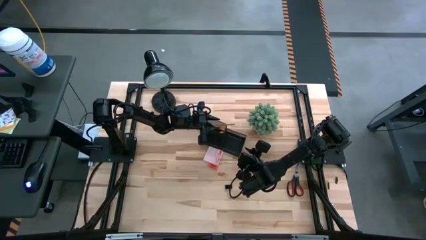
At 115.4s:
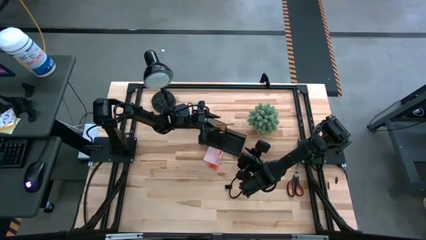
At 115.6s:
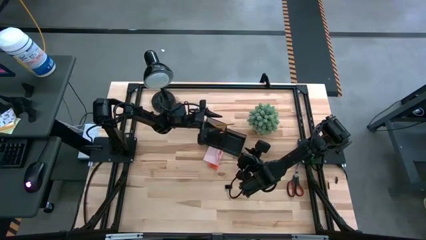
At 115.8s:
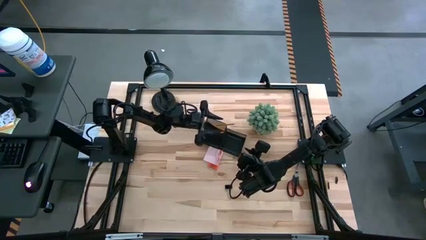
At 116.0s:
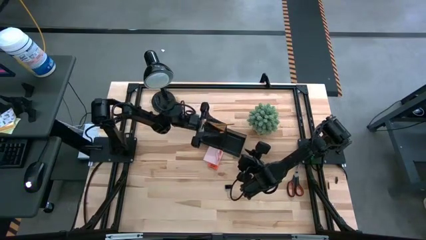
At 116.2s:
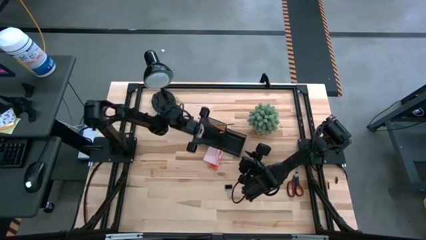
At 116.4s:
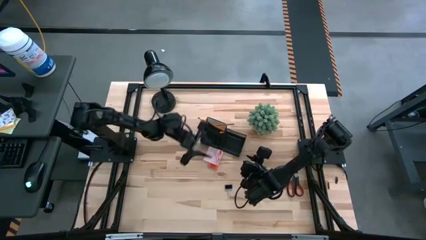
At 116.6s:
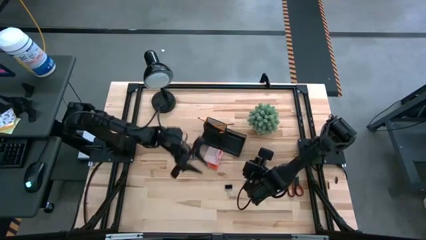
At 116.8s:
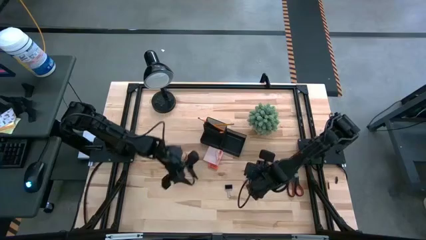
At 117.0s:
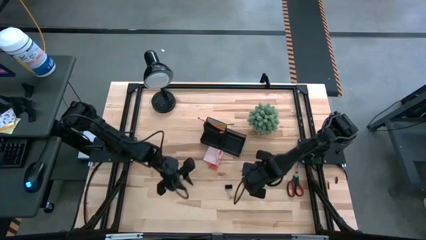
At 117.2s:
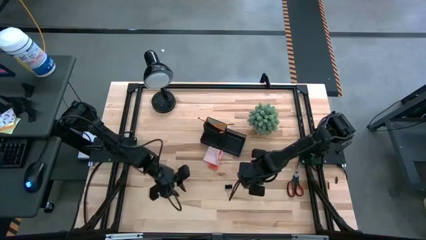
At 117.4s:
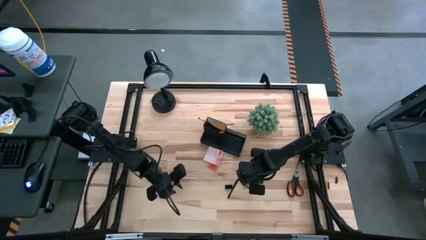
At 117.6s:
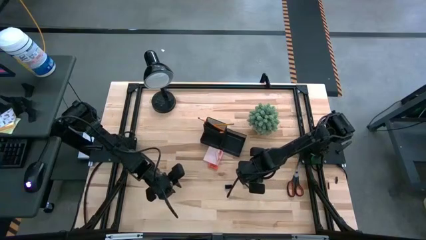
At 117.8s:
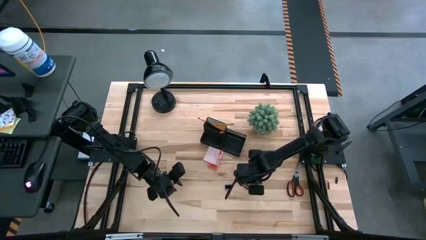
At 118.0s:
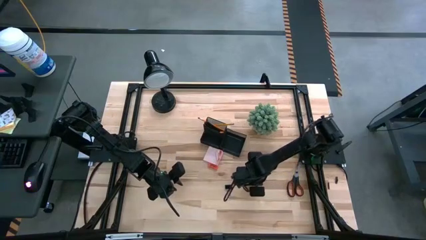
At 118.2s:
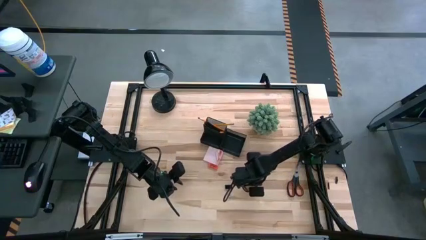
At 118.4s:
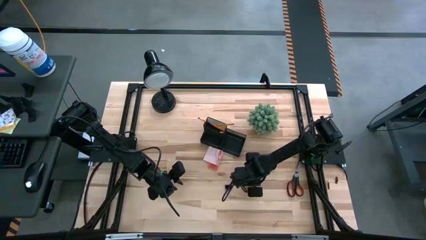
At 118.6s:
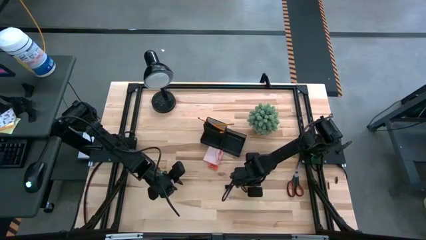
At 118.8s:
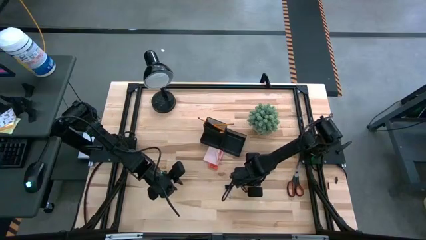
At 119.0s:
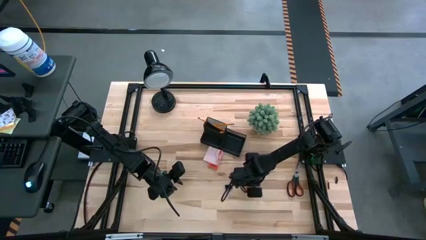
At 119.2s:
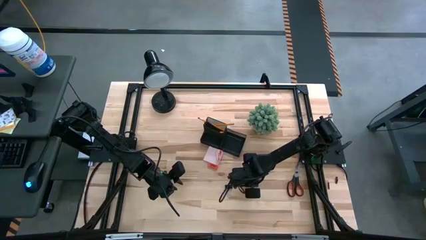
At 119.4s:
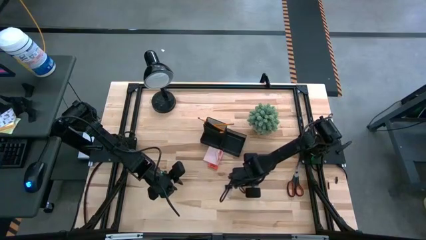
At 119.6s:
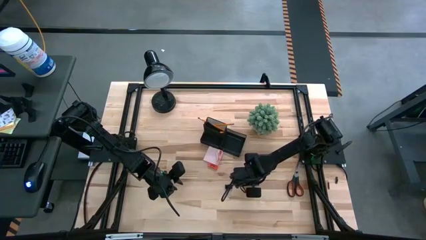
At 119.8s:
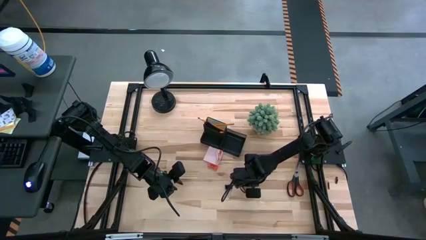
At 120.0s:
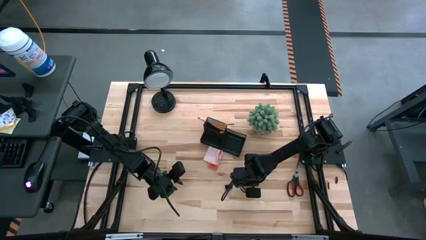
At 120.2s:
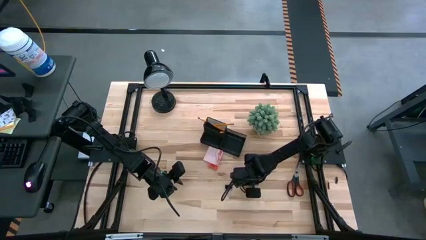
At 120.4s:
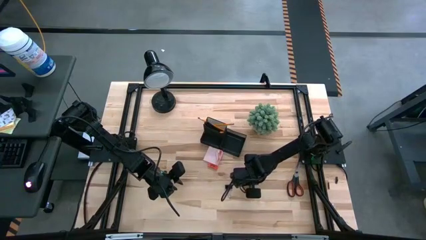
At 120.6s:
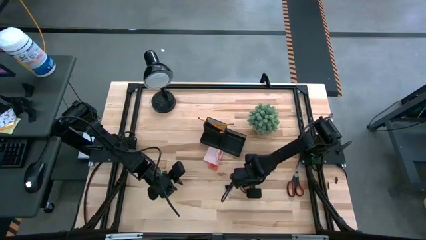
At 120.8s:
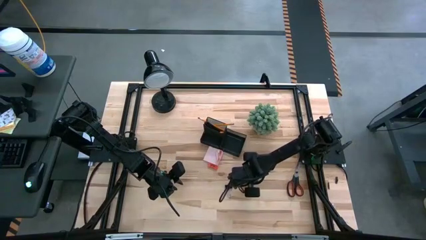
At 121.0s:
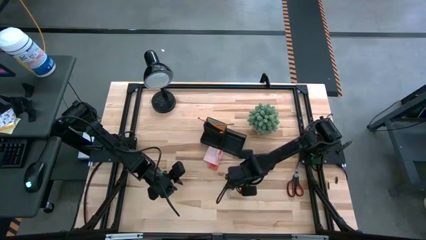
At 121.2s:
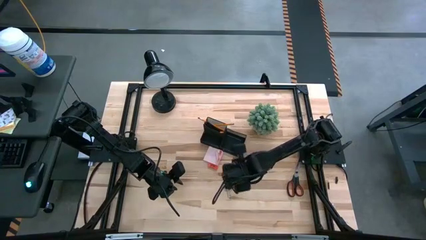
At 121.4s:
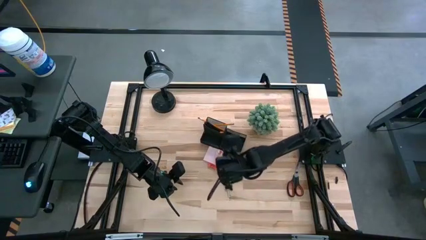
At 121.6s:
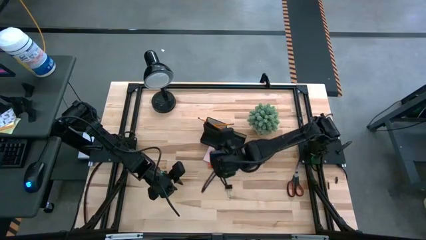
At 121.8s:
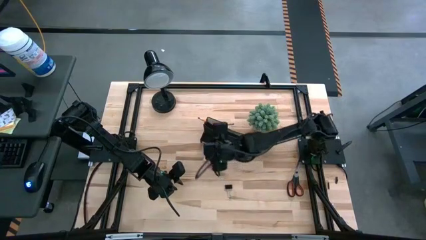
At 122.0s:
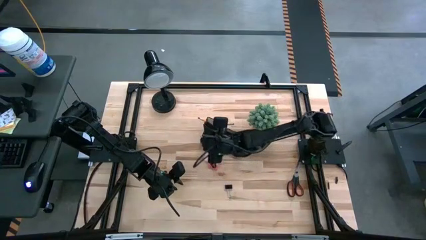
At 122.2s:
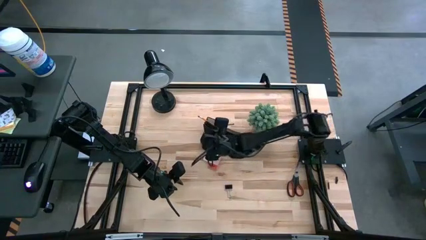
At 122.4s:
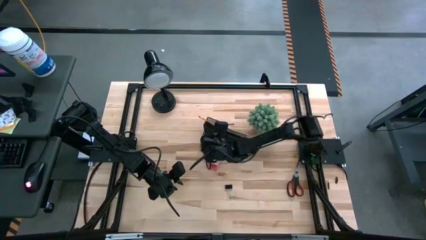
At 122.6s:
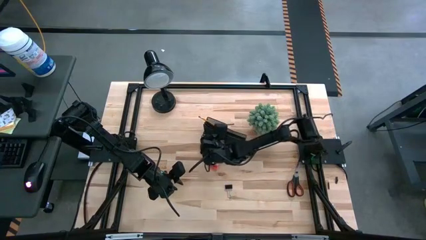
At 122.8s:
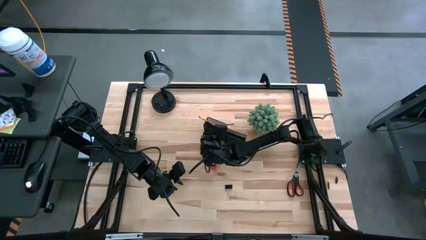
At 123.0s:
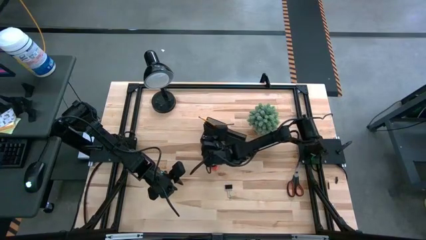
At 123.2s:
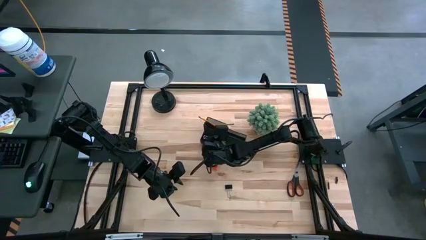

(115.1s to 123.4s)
Task: Pick and place office supplies into organizer
Put the right black binder clip into the black desk organizer

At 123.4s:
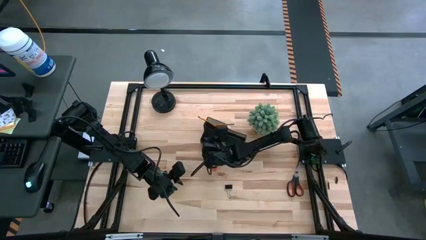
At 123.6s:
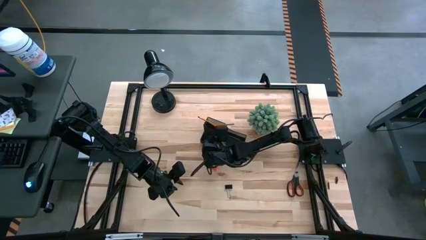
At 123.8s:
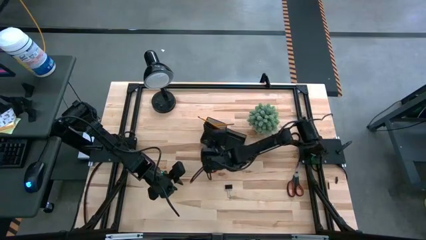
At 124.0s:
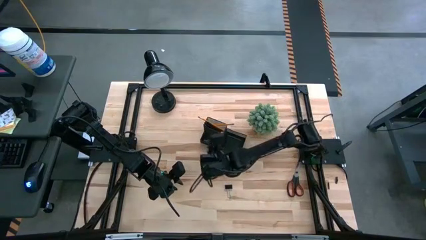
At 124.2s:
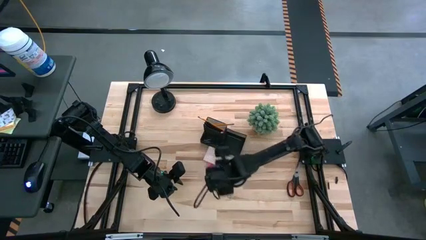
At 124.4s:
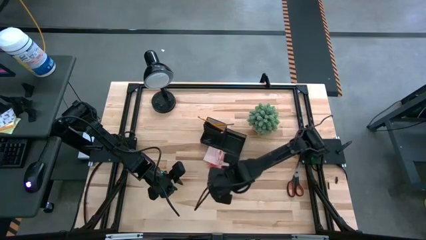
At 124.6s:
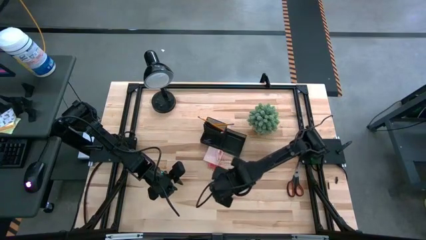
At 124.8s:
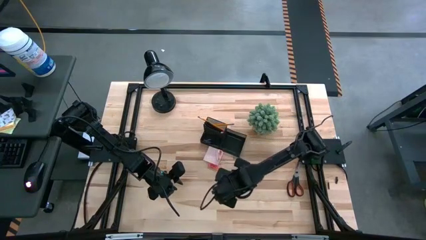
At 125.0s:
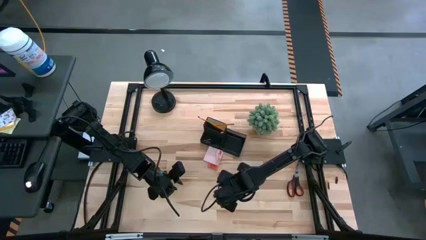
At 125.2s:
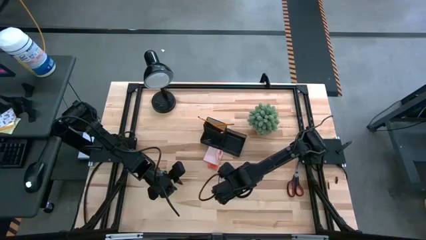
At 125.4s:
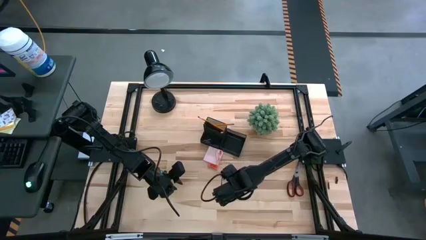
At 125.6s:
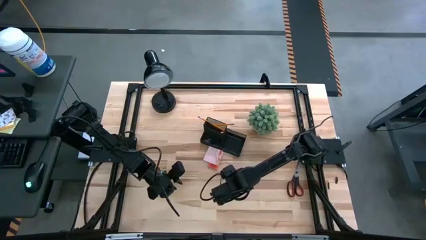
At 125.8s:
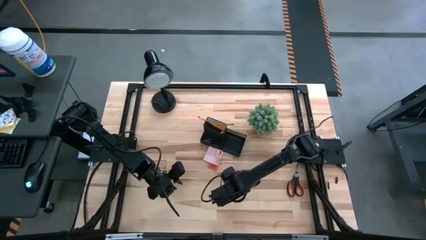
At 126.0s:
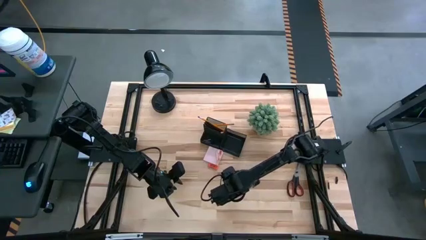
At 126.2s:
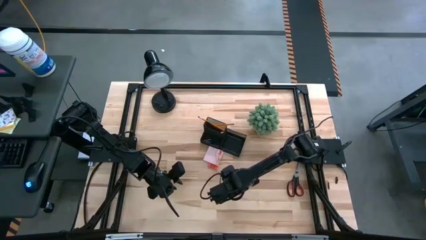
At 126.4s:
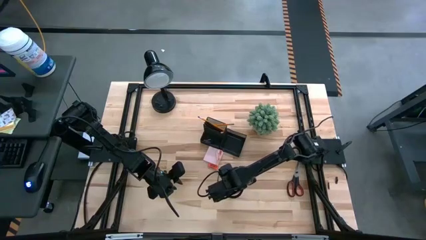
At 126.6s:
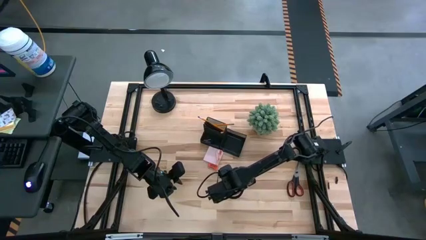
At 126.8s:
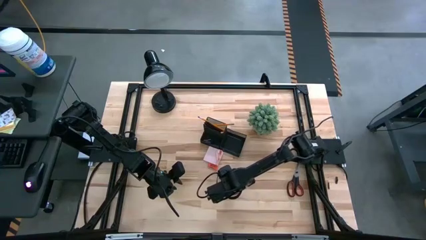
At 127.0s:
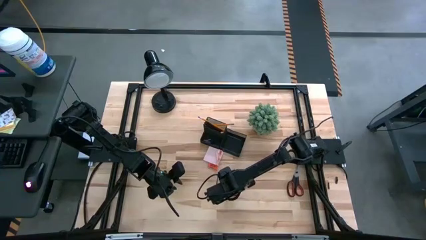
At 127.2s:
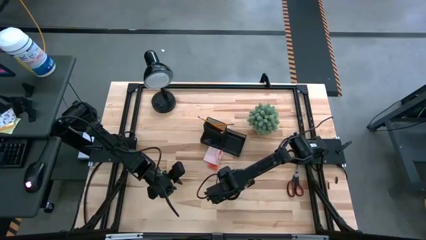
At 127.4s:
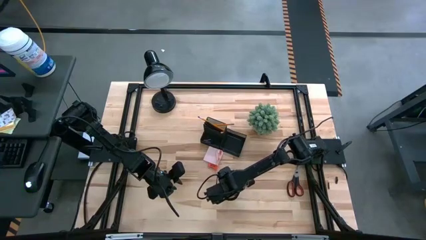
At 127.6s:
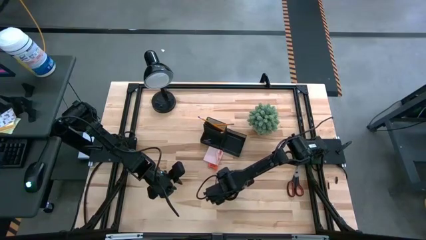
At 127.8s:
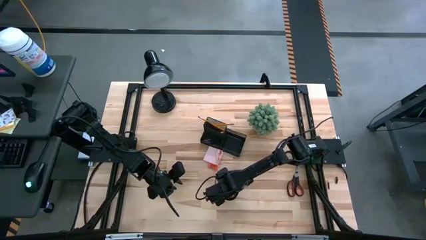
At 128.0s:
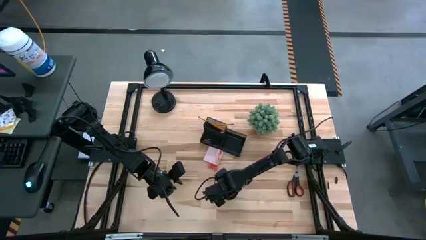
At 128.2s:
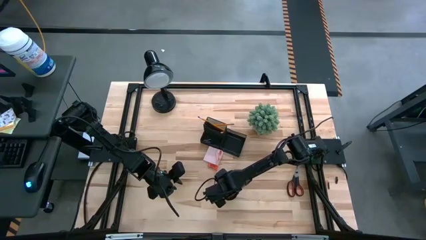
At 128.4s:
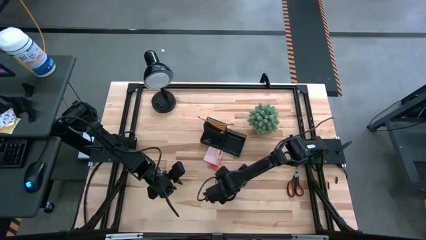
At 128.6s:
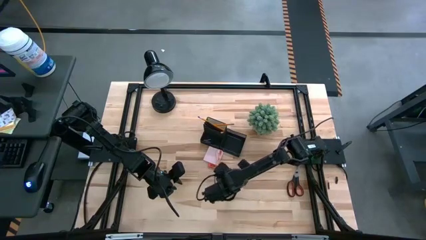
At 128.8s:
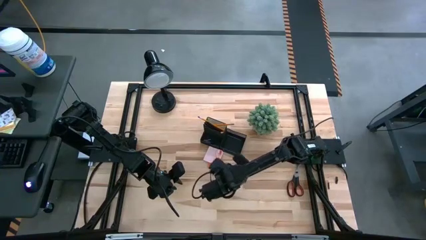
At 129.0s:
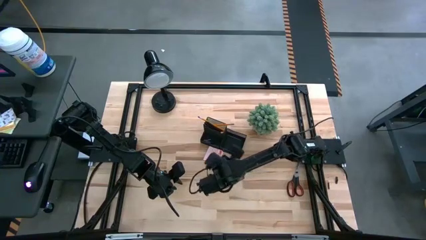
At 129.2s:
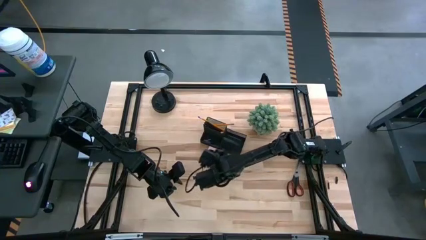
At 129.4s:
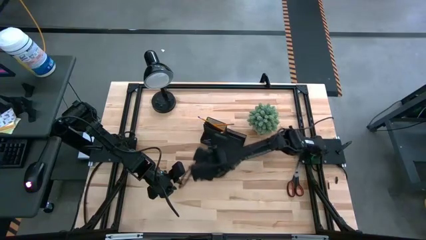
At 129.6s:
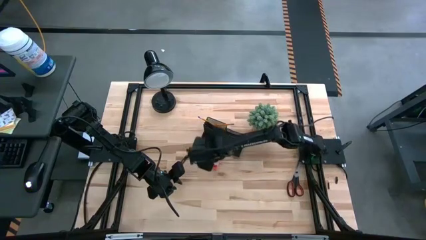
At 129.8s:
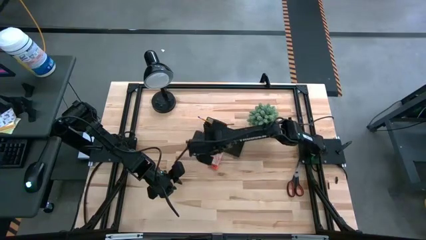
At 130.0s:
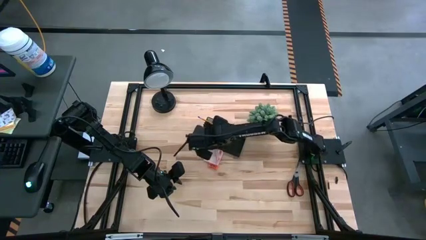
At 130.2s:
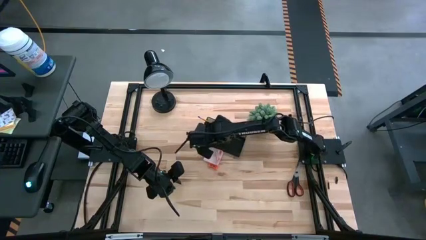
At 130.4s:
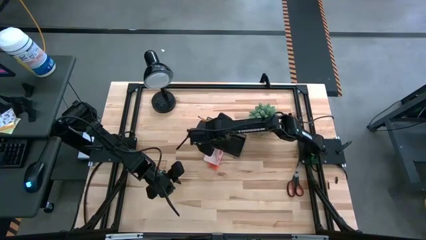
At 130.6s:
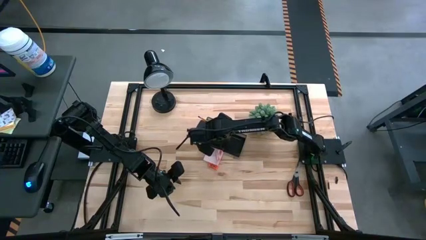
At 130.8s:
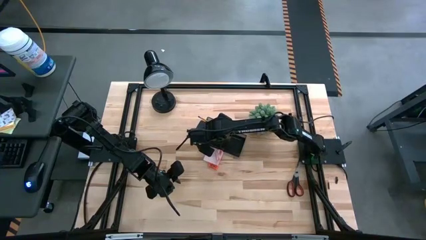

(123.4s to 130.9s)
Put the black binder clip into the black desk organizer
